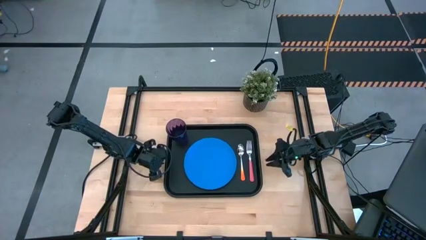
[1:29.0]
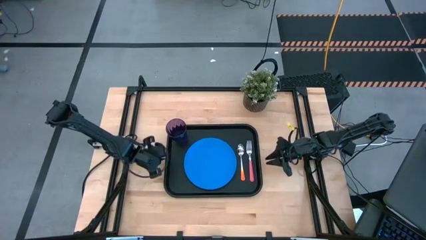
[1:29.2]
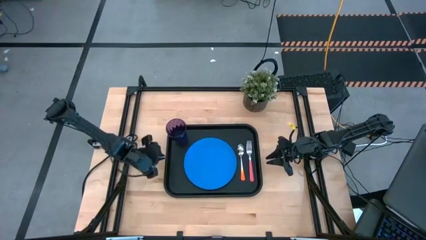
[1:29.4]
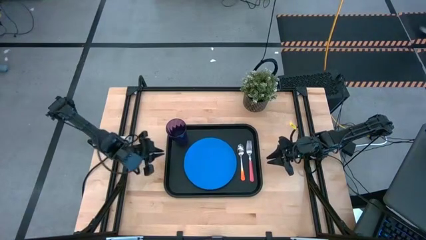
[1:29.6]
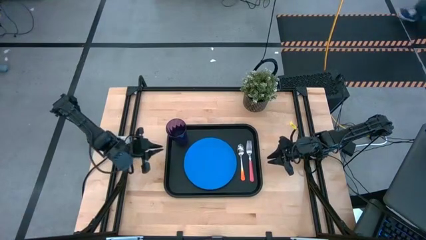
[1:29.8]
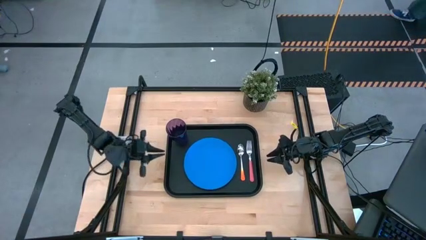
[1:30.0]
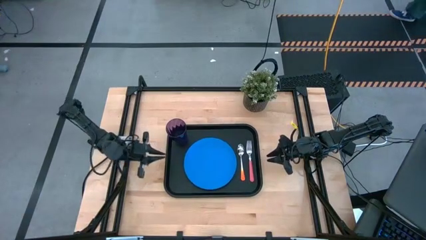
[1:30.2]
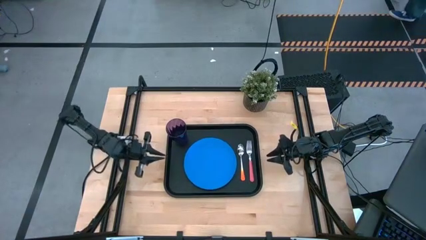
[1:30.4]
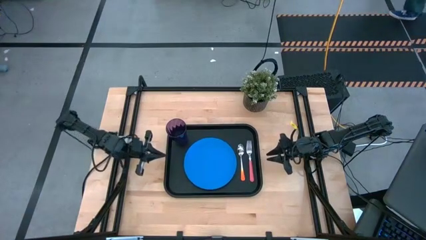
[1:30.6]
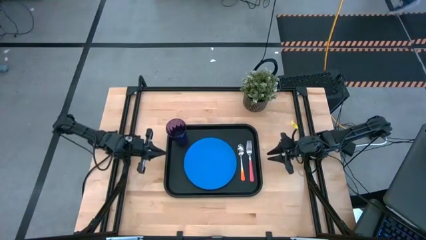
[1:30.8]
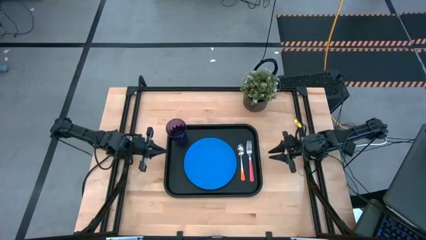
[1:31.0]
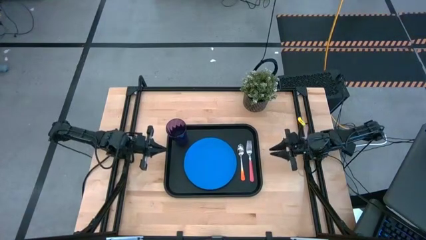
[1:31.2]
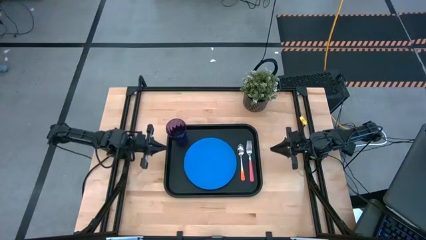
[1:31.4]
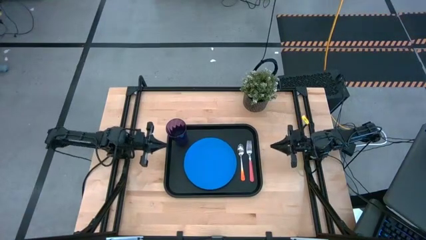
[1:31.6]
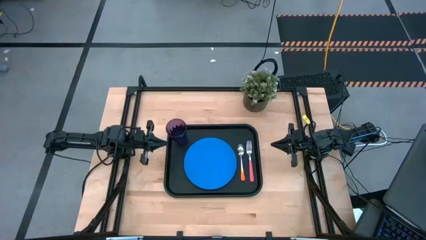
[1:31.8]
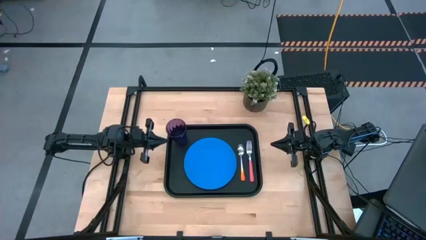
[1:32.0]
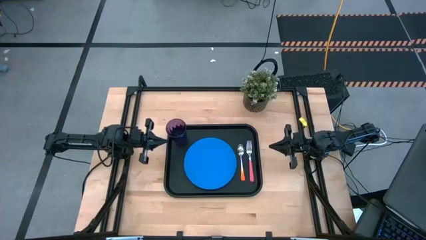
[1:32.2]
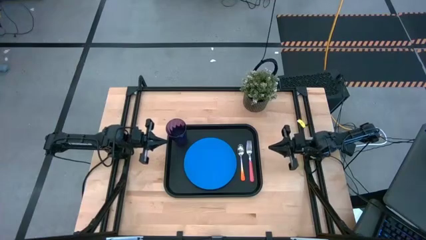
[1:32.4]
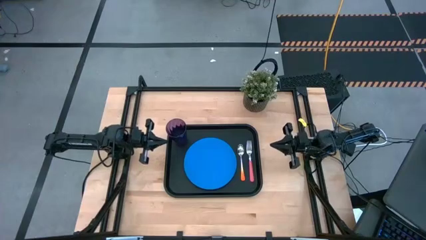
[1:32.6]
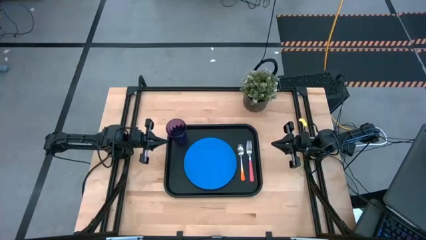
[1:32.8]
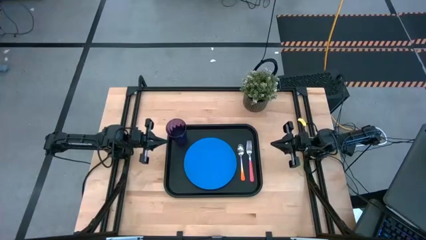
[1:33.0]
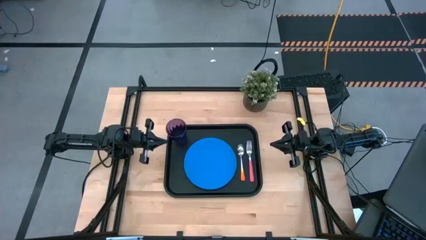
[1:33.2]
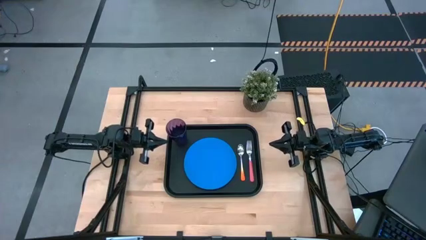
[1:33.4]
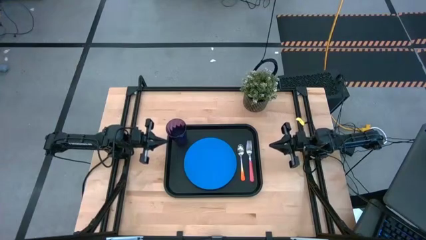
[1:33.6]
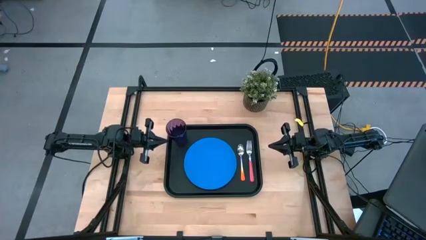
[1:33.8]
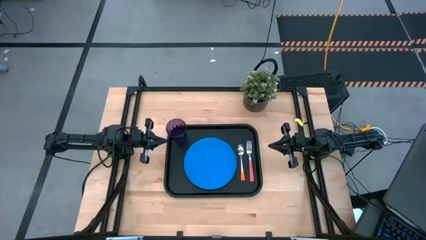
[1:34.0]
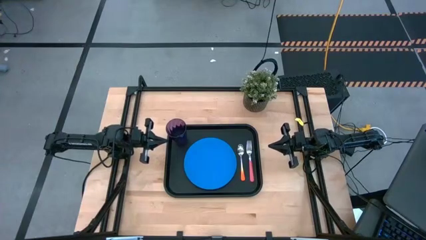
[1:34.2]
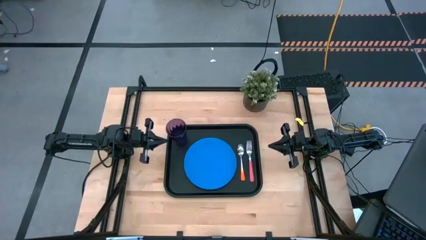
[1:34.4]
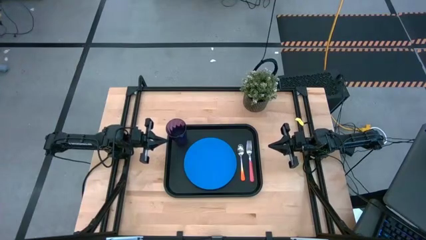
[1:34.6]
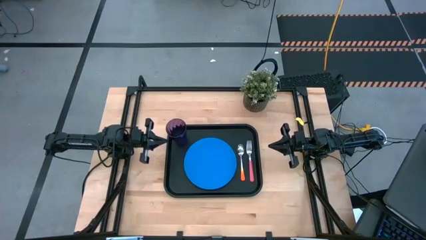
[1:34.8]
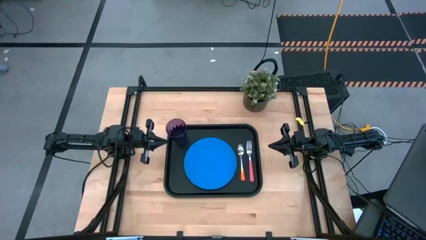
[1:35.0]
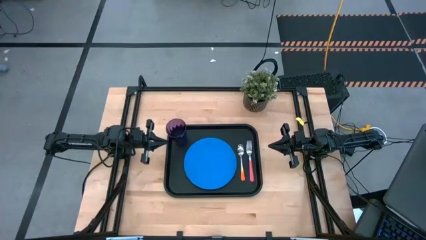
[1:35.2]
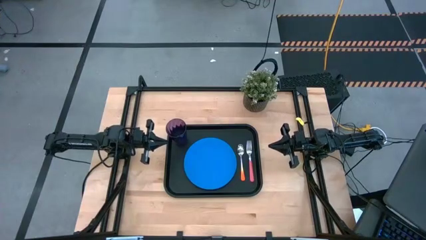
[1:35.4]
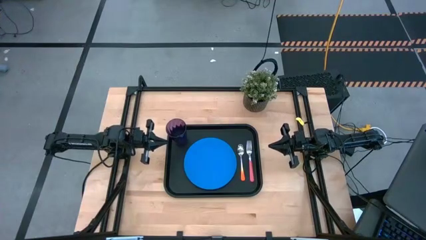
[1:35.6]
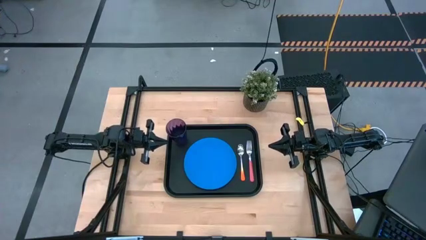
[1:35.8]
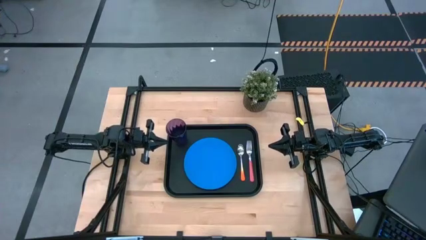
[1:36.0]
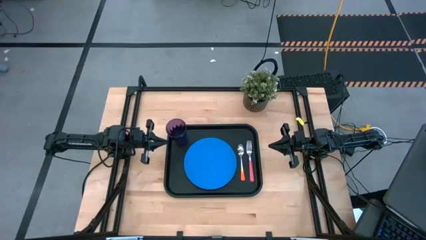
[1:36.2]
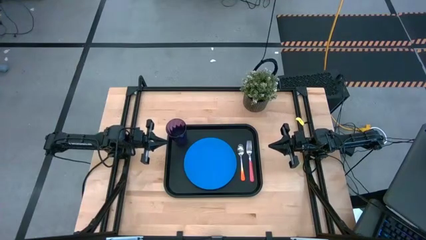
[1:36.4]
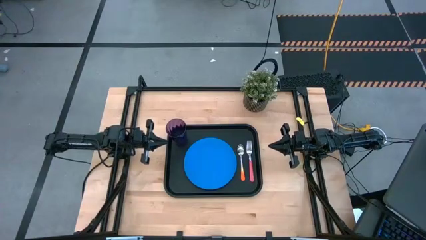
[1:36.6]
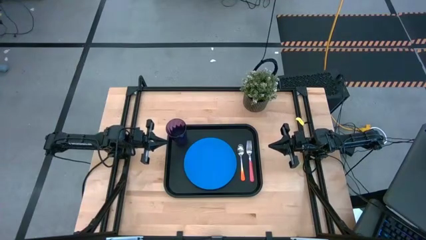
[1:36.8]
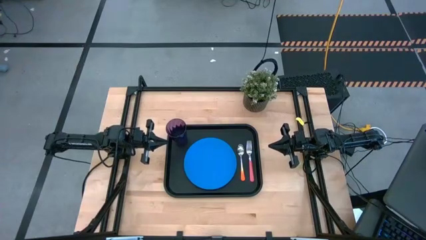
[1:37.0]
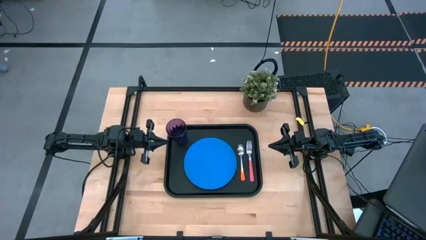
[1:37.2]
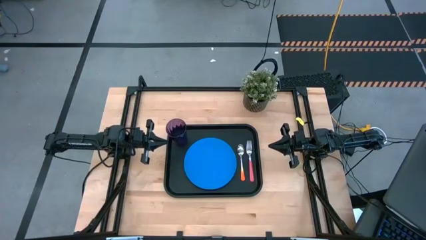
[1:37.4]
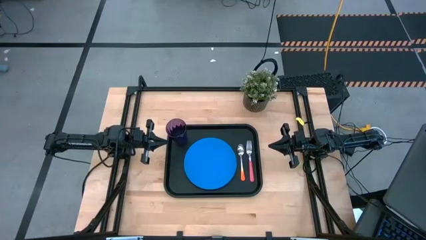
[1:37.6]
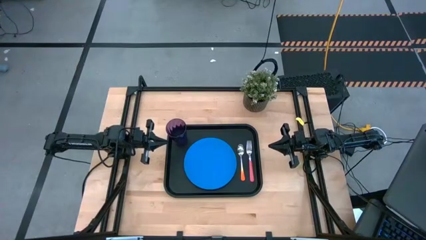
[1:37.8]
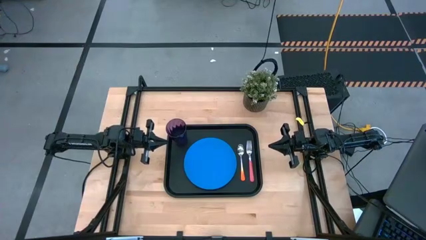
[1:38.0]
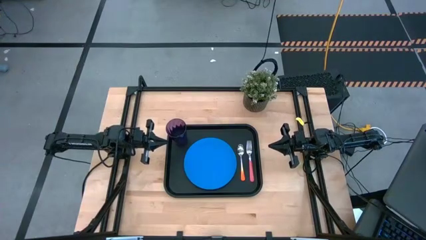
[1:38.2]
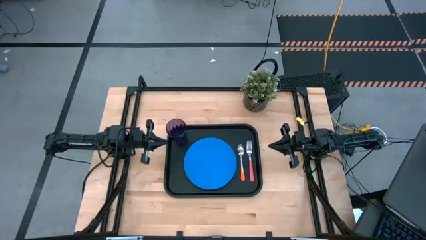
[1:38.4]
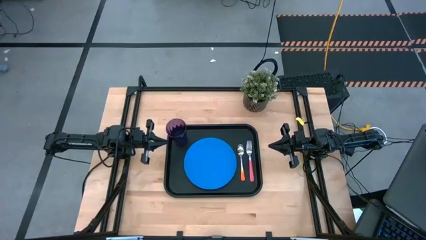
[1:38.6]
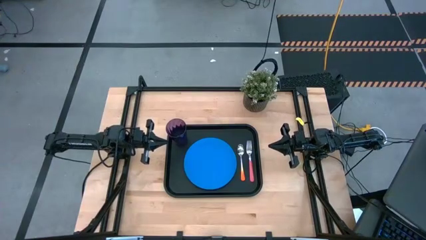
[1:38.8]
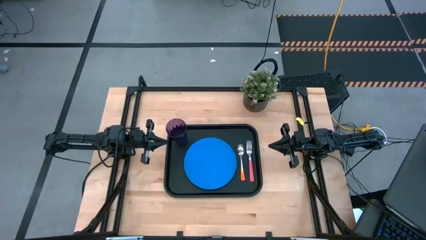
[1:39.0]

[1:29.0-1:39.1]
Task: Pick and place plate/cup/fork/spoon on tray
Return to Home Position

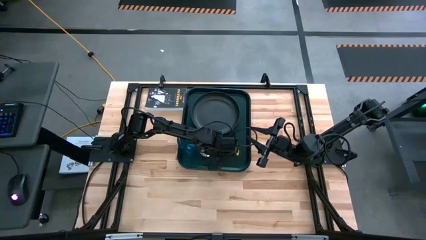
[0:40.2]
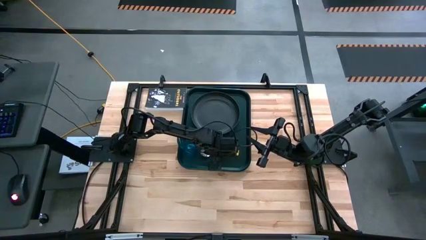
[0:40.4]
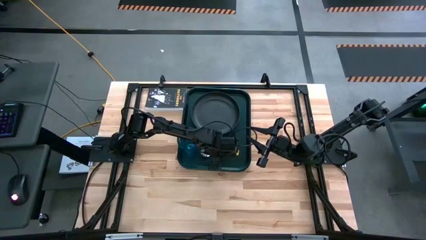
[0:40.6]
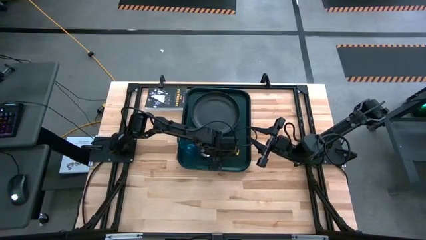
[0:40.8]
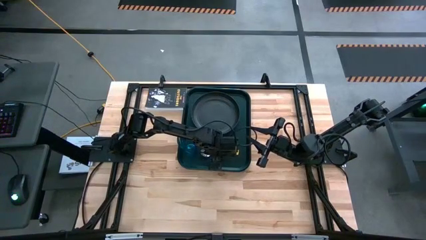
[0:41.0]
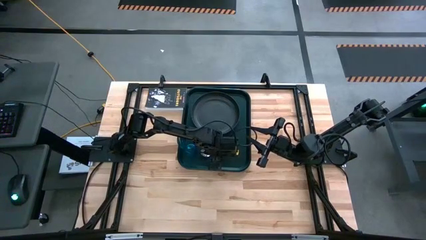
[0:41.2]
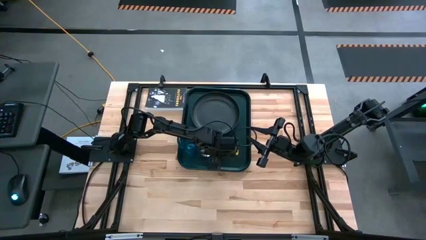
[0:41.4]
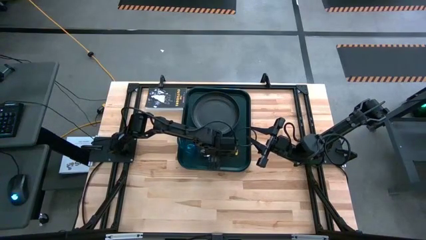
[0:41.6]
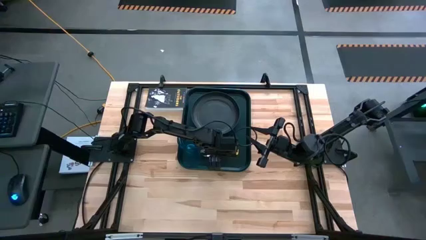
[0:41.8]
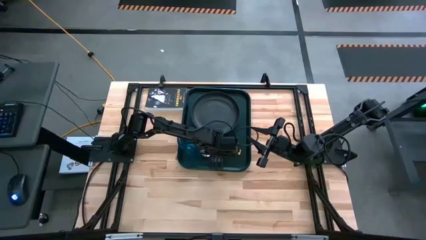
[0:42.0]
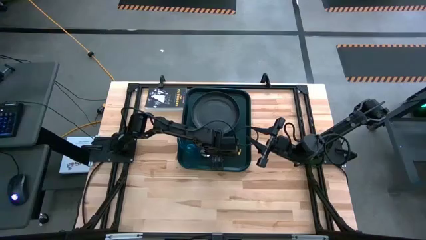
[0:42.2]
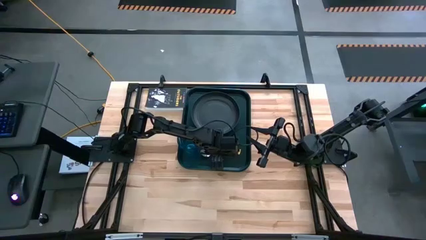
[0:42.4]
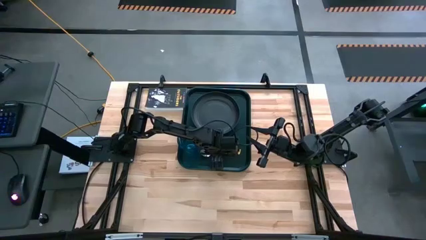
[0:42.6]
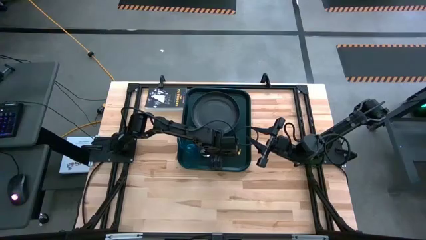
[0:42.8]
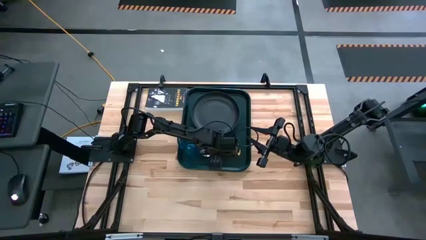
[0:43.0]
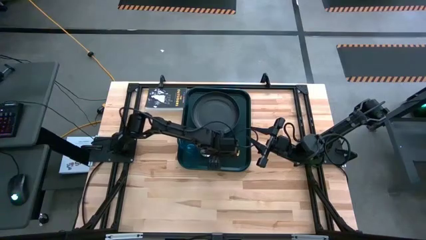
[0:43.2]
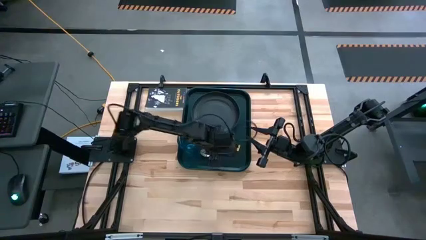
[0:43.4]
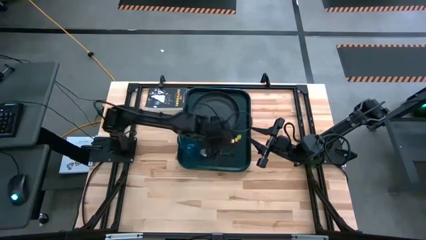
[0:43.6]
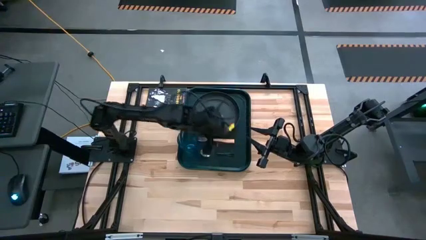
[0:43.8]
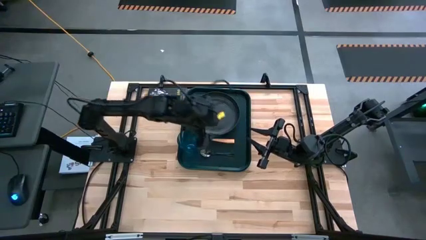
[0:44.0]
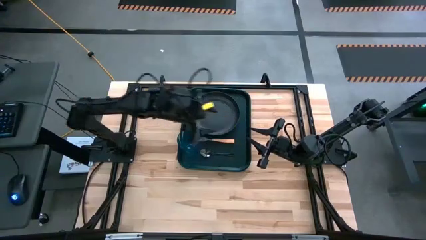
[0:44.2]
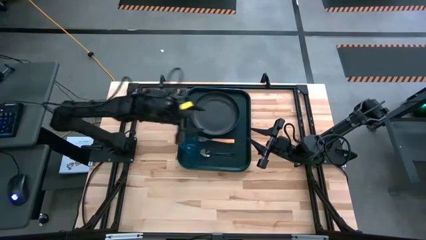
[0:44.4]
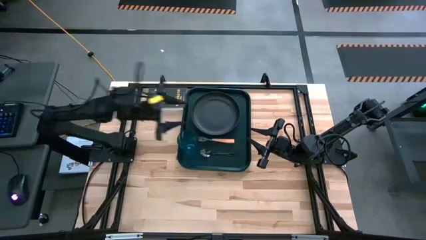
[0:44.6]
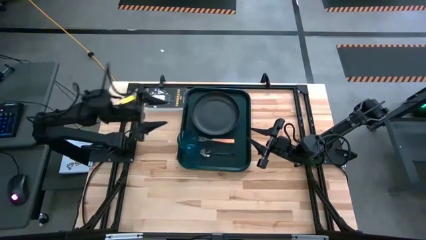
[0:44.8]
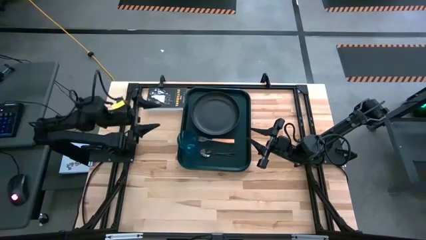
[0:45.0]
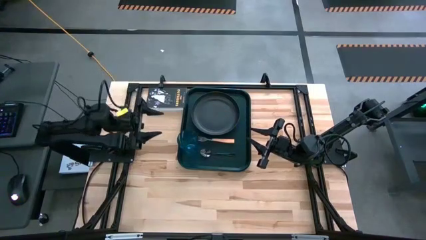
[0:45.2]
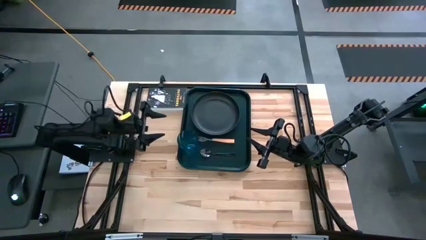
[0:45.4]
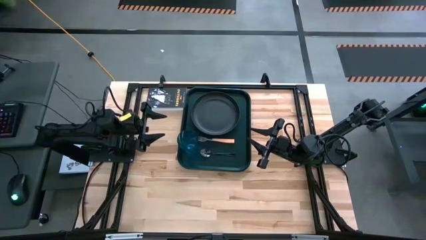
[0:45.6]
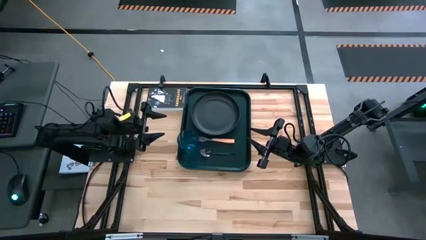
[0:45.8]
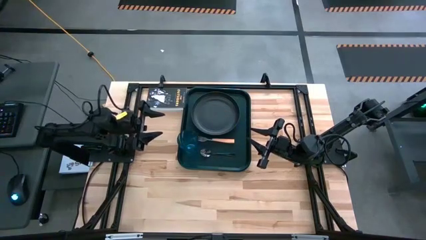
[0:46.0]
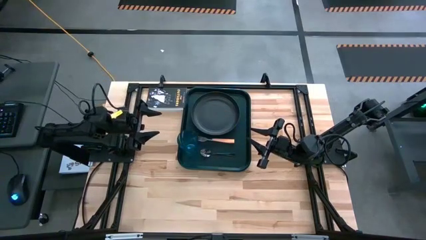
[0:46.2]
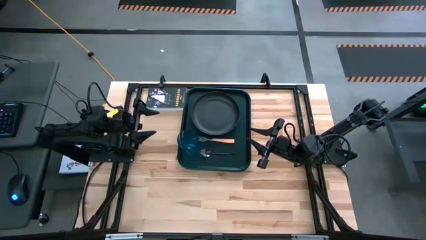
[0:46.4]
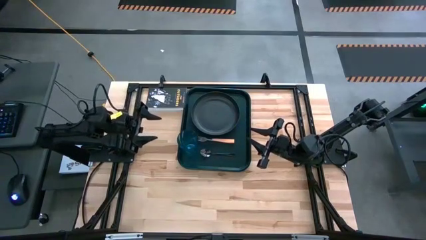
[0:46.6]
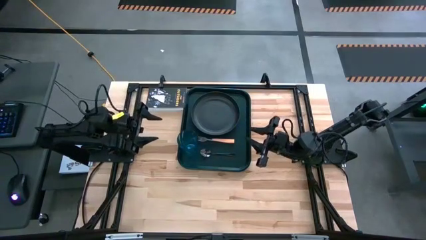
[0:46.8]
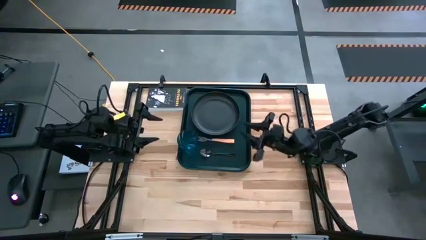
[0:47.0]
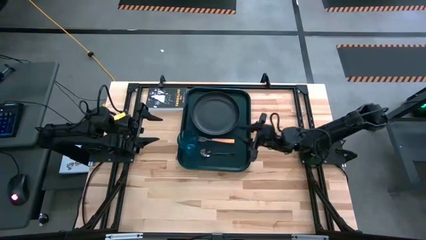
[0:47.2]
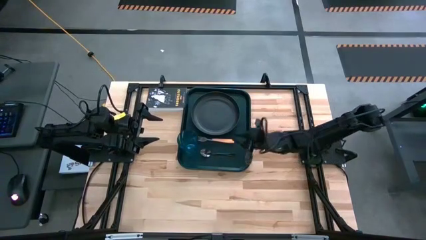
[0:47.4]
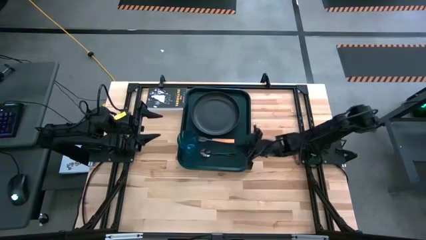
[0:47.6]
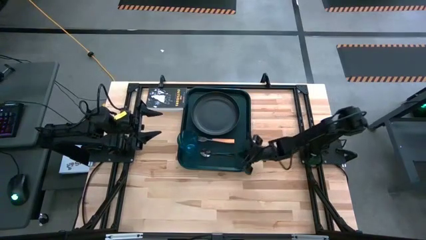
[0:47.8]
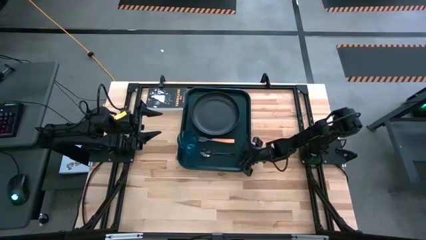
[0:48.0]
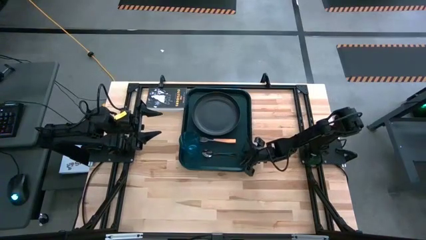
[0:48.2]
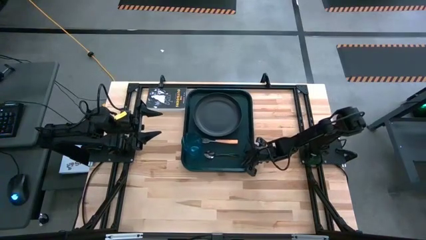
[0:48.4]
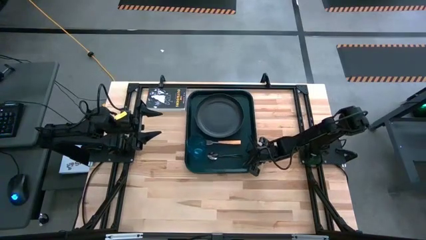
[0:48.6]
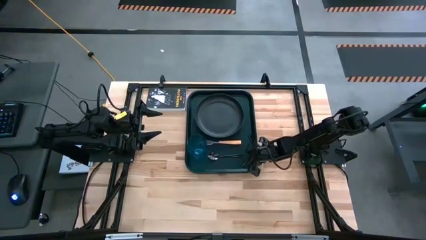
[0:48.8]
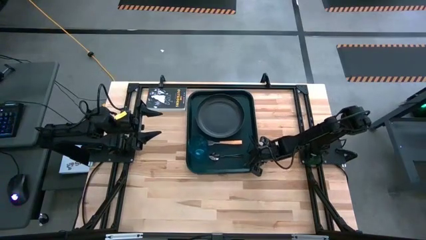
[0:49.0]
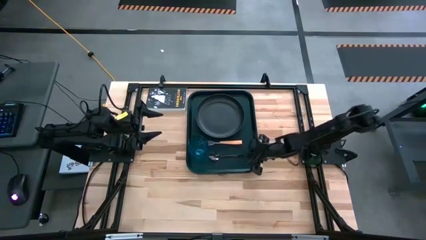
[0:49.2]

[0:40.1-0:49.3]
Task: Pick and place plate/cup/fork/spoon on tray
Adjust the black serving tray
